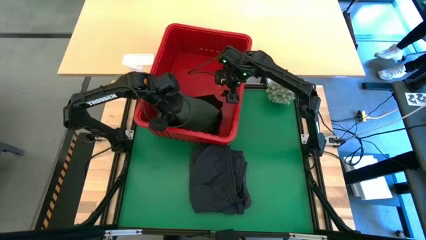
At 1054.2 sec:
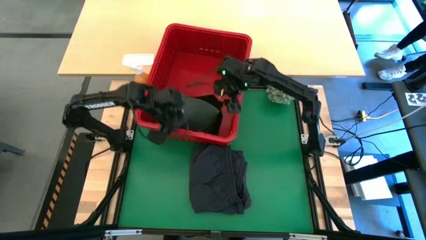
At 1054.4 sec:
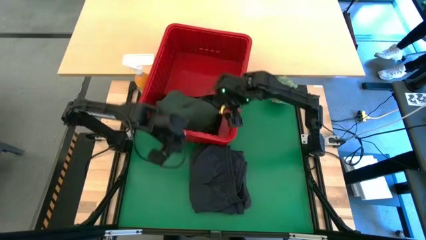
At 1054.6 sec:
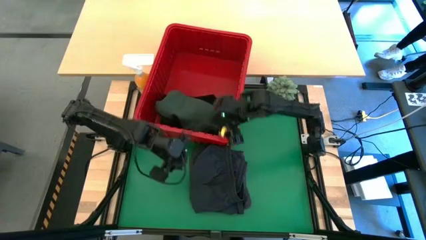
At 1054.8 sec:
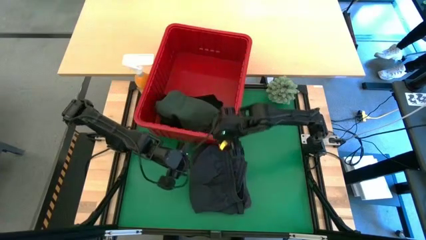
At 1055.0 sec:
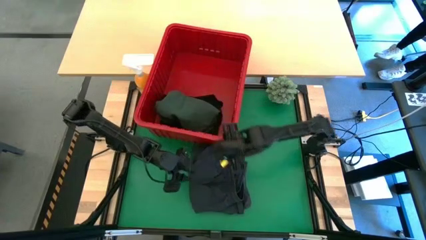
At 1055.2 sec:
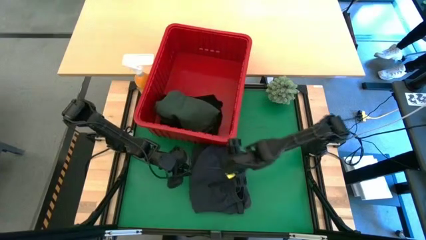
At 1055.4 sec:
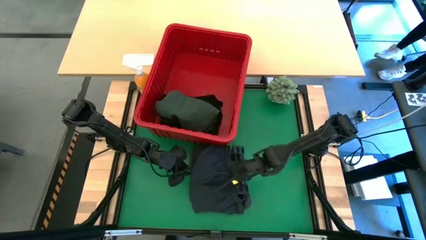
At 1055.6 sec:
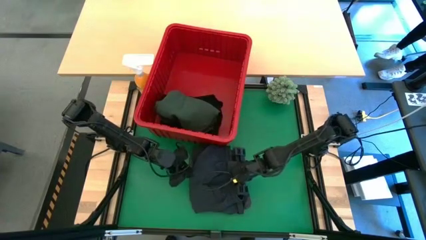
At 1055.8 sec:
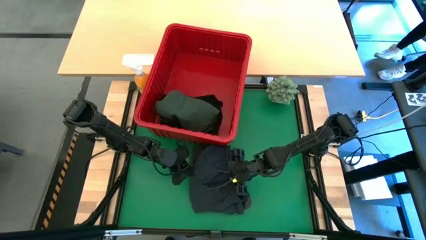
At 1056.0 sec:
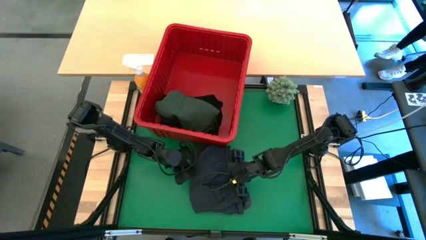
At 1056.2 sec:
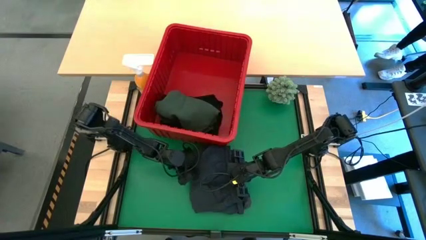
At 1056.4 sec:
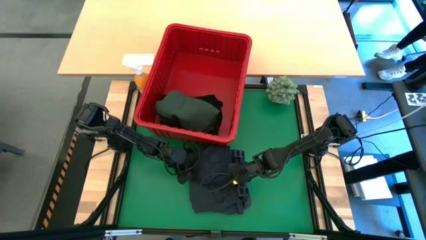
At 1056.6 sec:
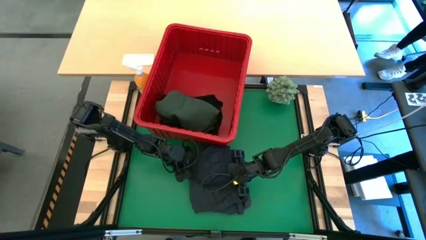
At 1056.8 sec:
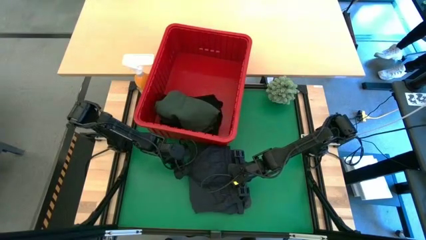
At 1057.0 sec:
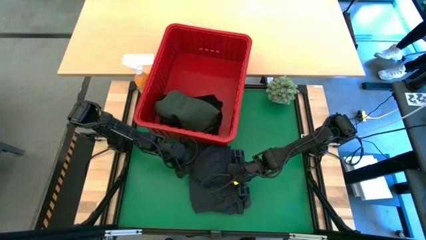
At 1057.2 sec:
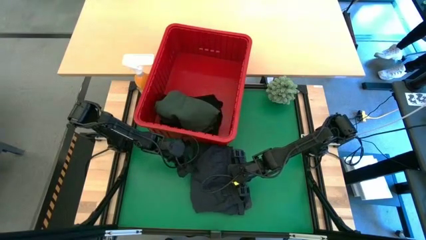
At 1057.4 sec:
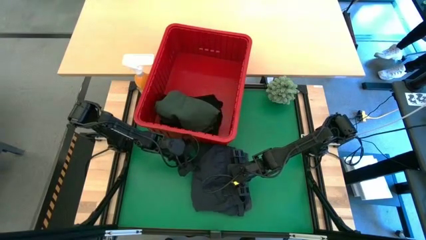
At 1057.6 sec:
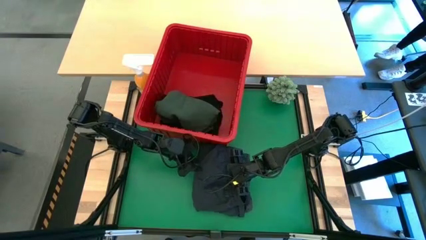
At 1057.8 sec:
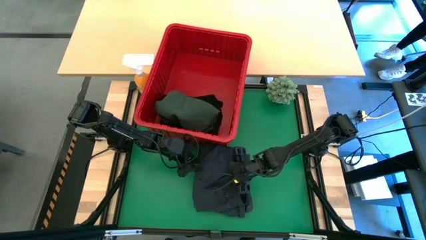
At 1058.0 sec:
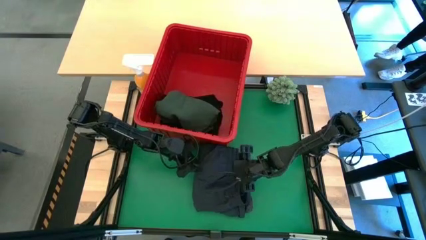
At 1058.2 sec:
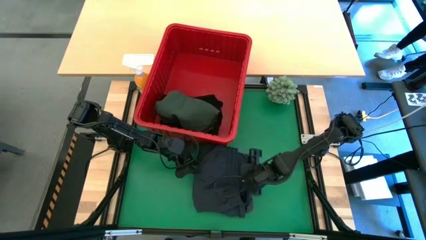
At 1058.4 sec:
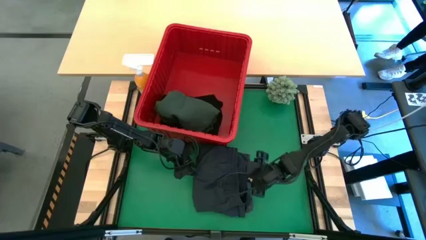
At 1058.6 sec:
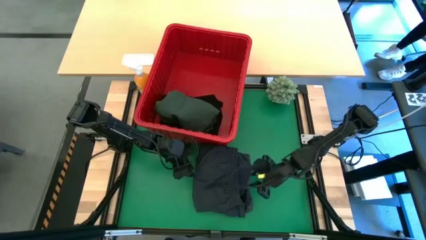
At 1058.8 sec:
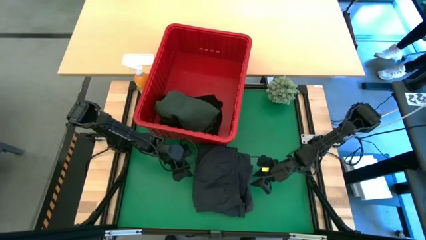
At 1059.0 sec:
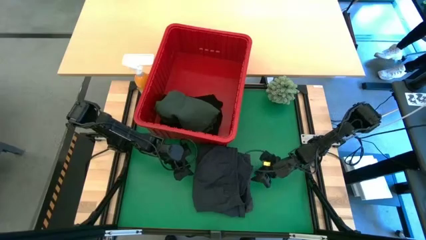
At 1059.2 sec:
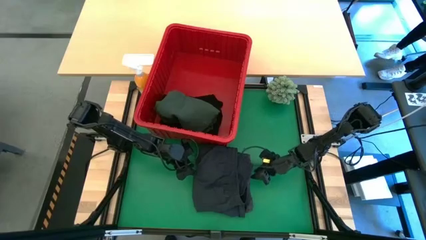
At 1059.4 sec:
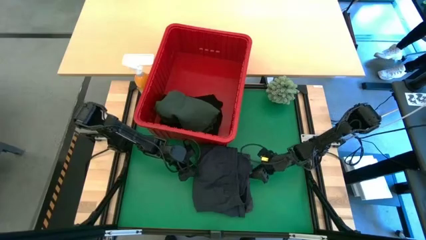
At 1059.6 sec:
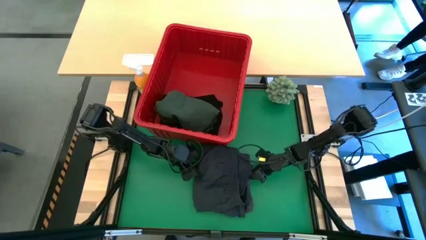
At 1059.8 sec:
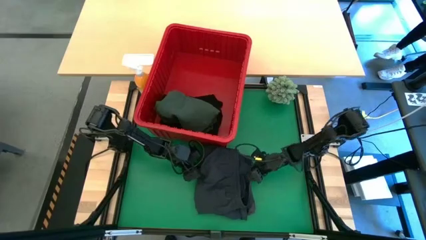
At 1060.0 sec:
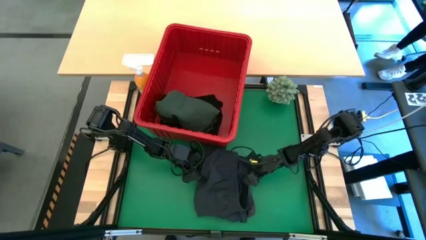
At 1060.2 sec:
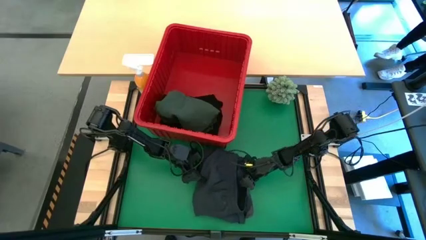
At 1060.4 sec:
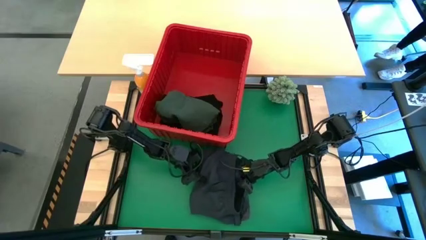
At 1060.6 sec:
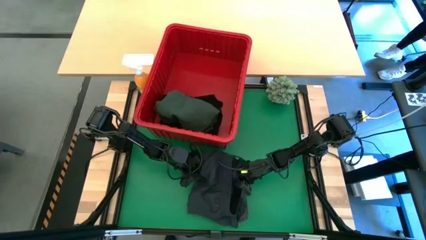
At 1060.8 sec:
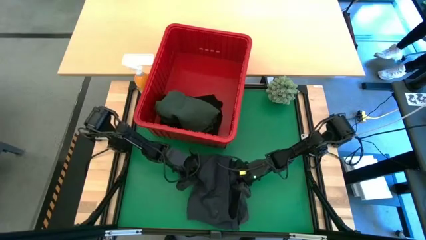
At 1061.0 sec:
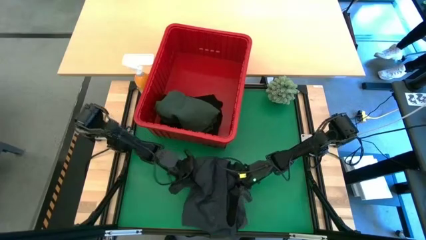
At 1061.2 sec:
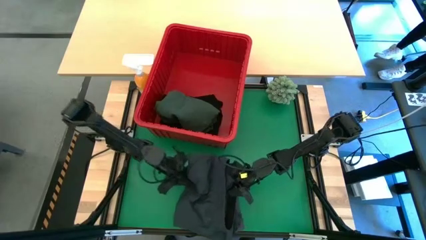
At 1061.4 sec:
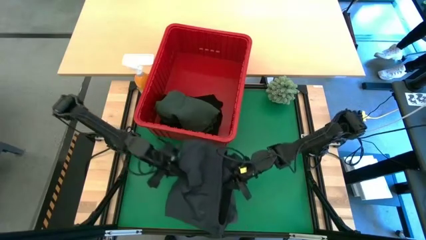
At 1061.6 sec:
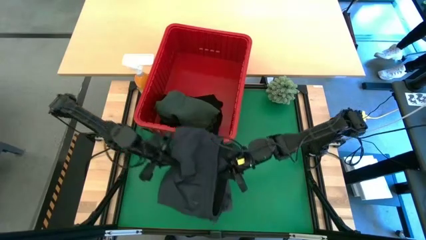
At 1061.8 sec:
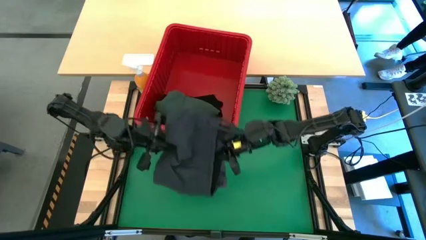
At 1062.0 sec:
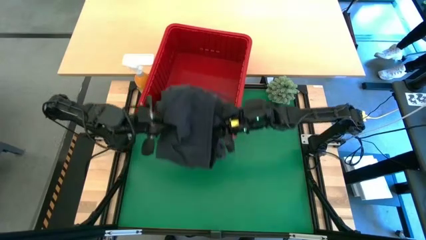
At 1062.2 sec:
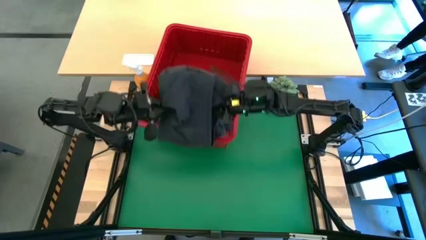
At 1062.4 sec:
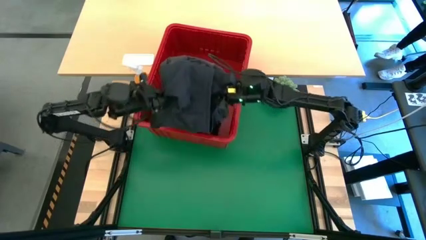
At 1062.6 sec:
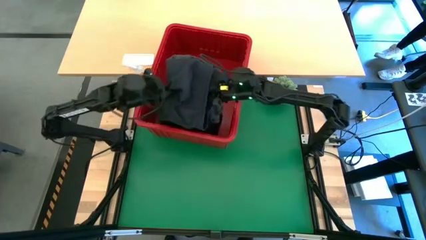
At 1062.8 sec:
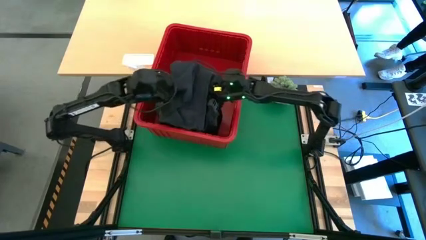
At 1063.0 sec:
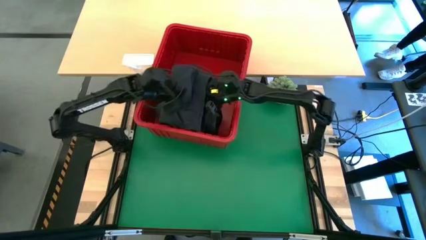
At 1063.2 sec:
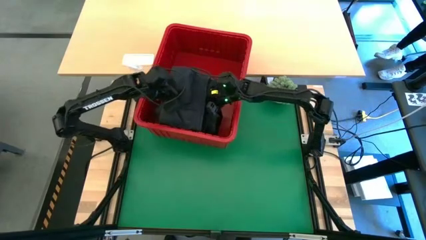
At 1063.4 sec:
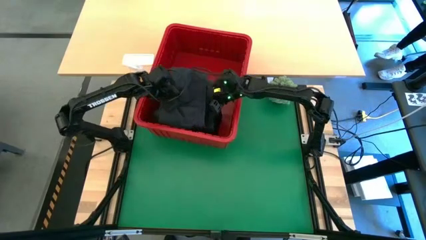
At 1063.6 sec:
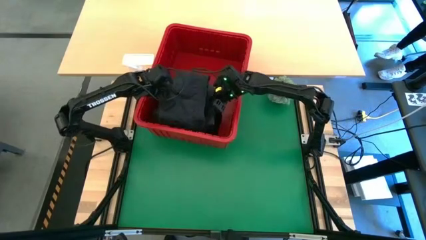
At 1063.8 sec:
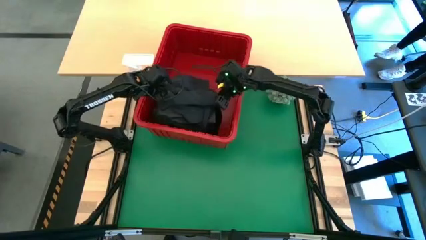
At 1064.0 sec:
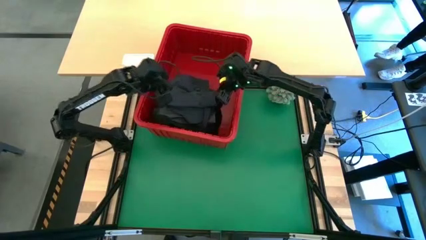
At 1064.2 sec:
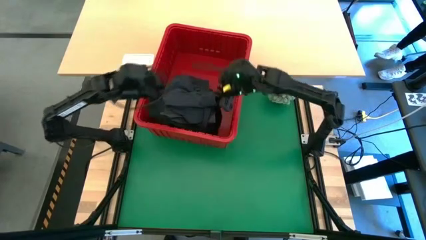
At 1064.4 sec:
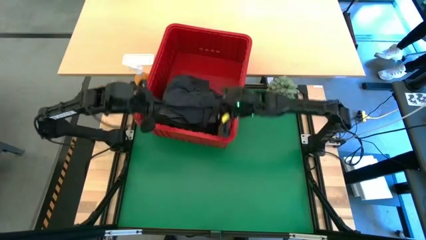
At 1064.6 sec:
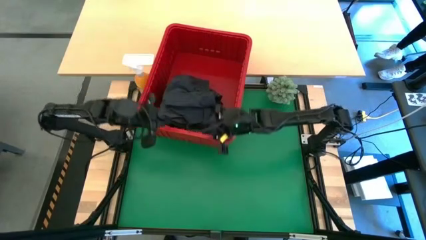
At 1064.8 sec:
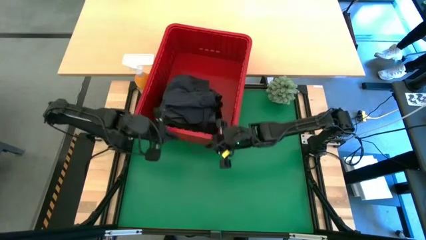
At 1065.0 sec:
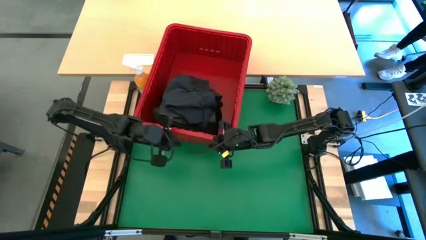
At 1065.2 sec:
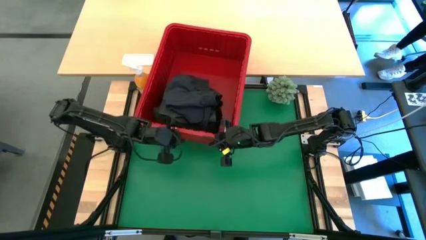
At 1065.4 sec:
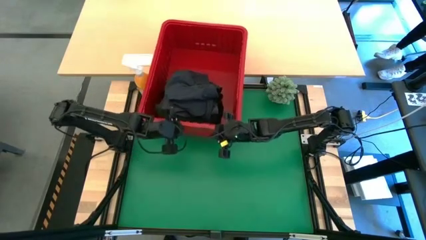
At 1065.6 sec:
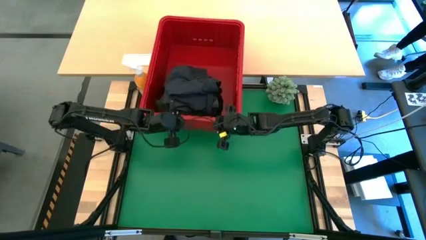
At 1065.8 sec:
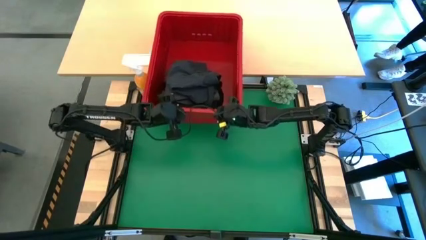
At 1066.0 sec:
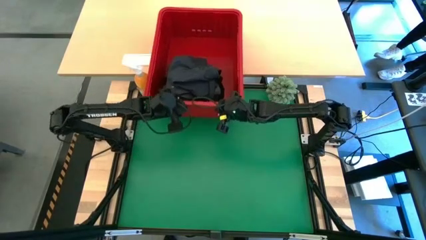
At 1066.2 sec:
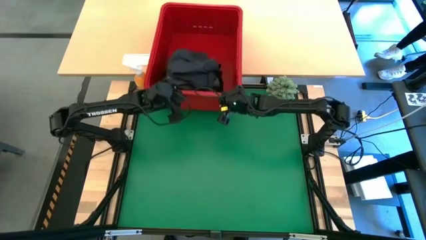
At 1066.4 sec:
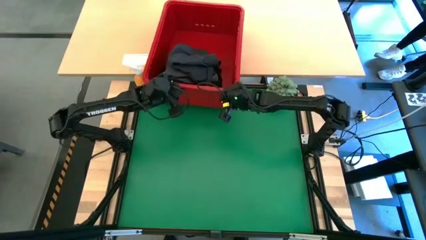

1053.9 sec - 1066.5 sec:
Task: Fold Laundry from Bin
Put the dark gray short and gray short into the red bin

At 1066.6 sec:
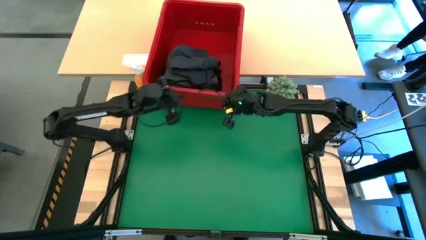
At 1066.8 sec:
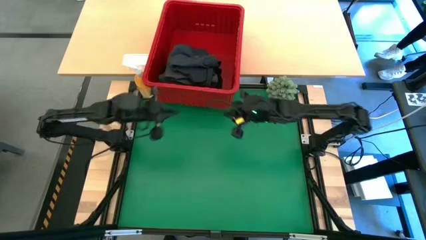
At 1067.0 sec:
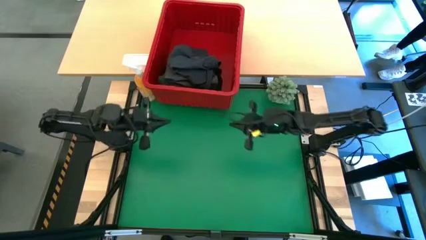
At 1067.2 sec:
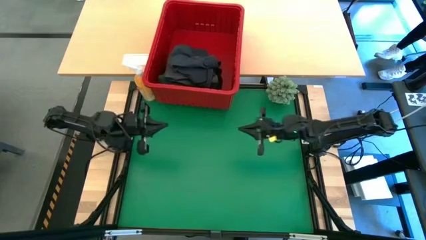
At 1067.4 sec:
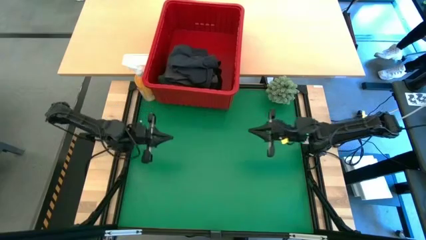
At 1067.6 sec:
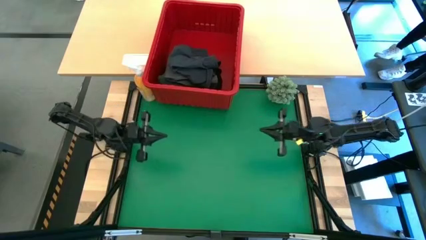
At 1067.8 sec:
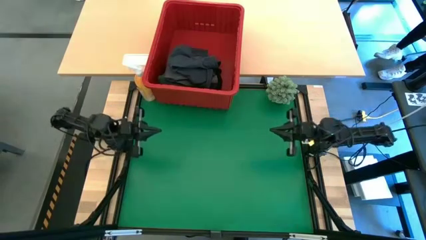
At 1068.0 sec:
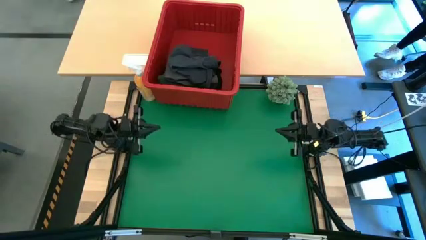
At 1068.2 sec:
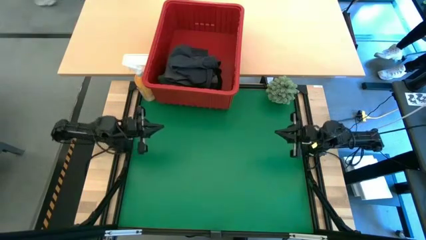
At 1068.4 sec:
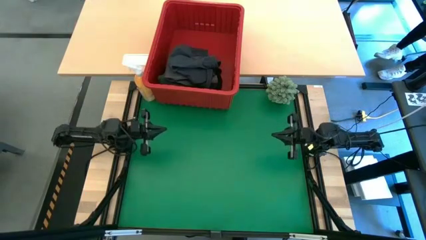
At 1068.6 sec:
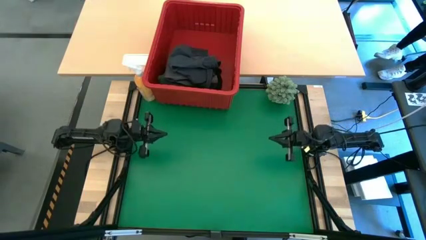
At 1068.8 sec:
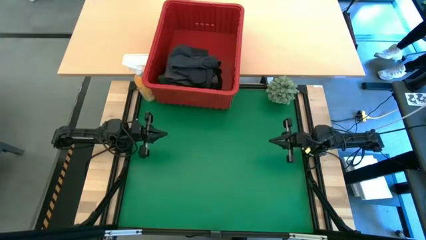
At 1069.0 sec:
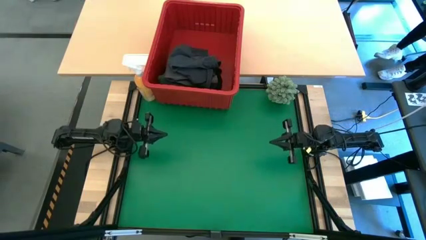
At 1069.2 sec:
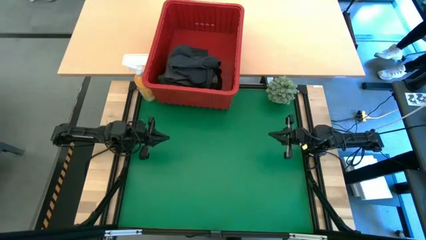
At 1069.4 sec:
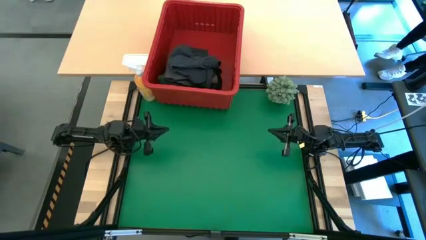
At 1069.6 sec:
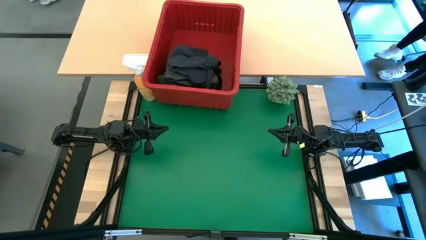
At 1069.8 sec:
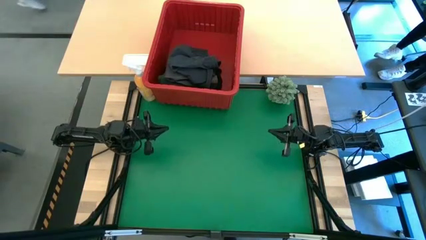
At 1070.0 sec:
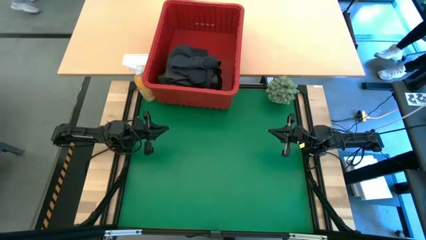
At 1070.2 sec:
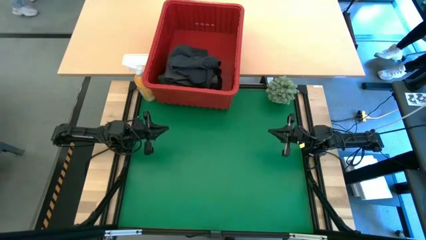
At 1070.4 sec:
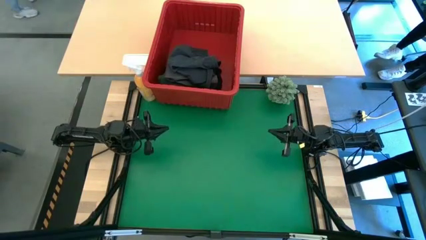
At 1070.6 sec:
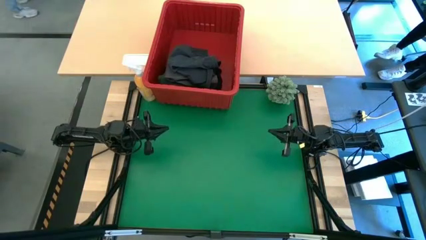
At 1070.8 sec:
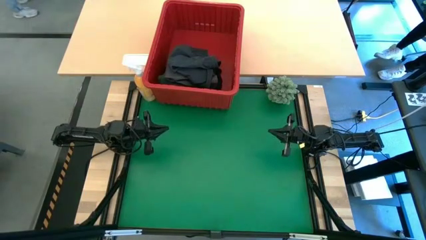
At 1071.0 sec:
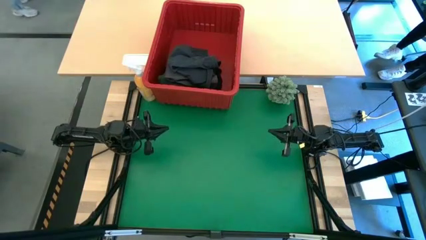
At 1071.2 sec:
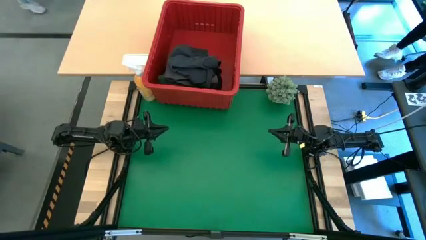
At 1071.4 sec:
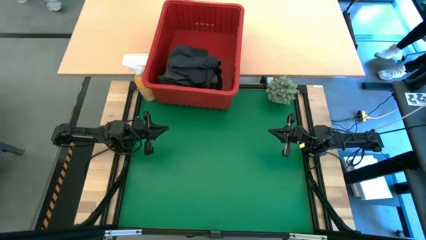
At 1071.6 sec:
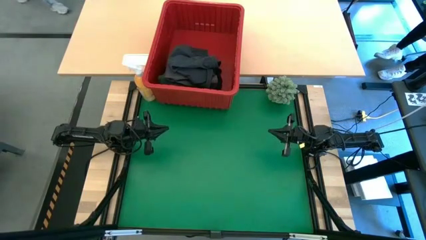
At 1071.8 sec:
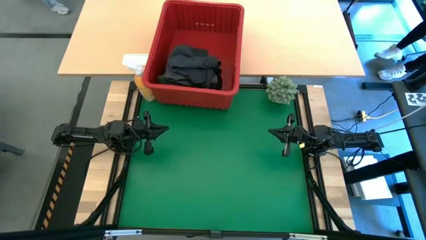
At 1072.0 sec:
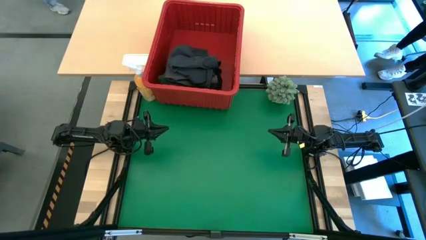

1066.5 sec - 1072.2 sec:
Return to home position
